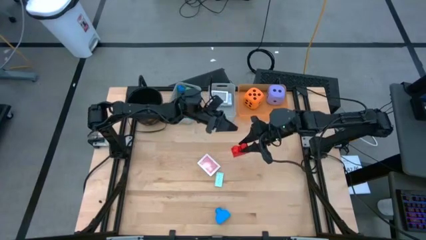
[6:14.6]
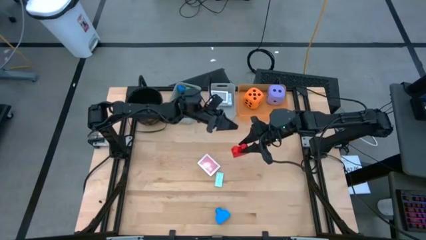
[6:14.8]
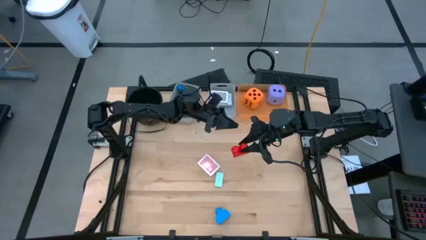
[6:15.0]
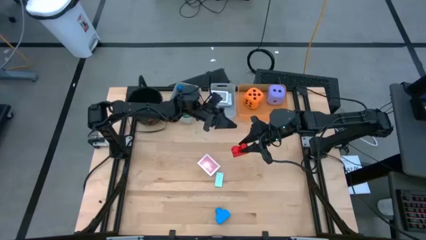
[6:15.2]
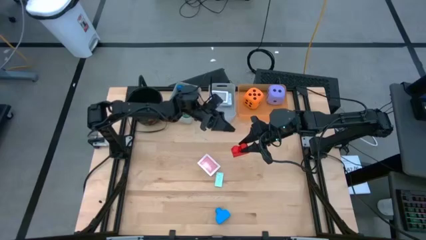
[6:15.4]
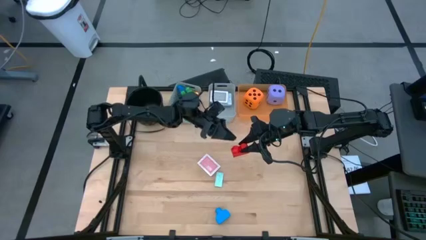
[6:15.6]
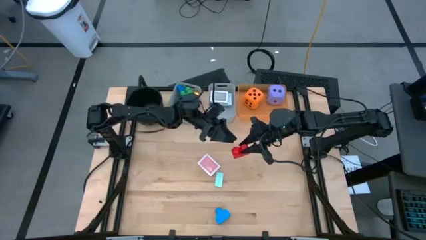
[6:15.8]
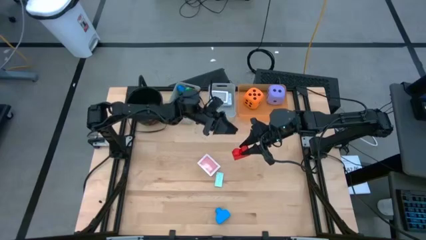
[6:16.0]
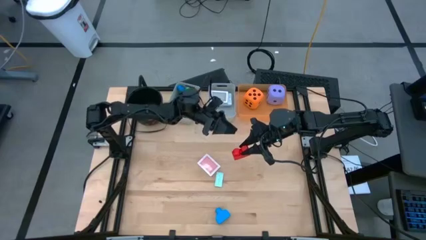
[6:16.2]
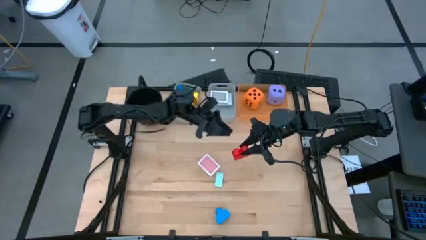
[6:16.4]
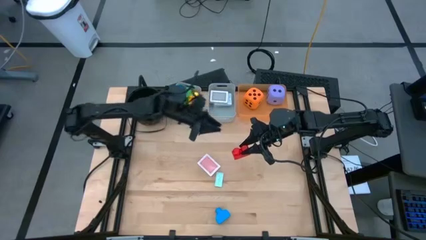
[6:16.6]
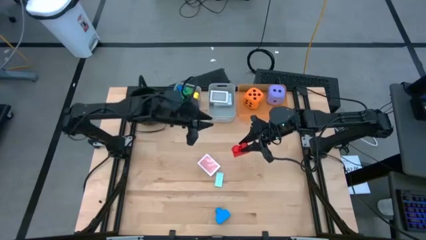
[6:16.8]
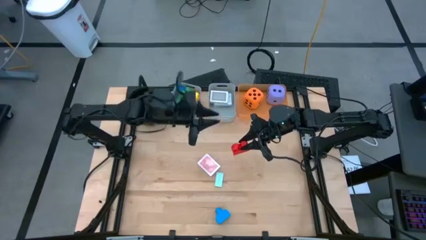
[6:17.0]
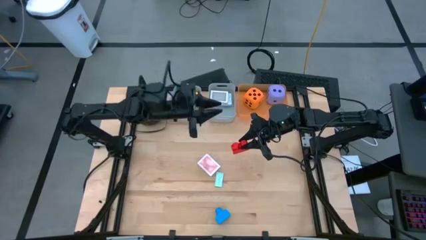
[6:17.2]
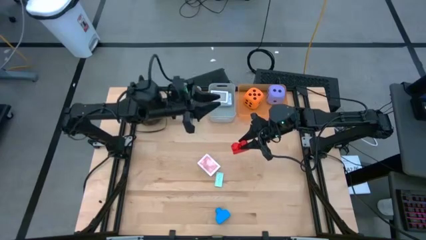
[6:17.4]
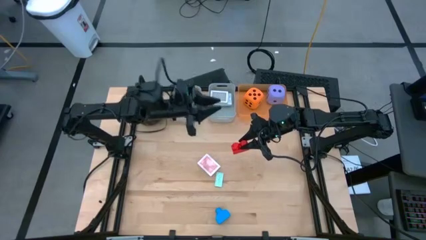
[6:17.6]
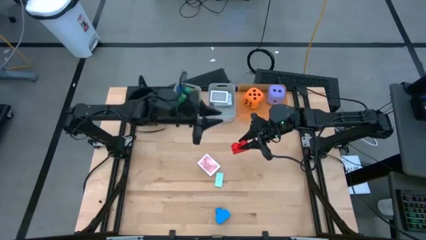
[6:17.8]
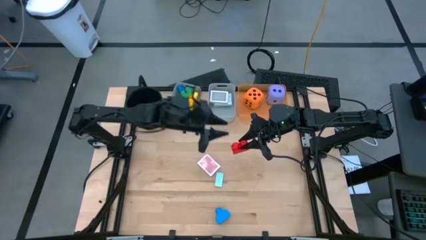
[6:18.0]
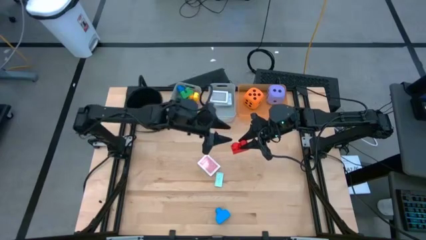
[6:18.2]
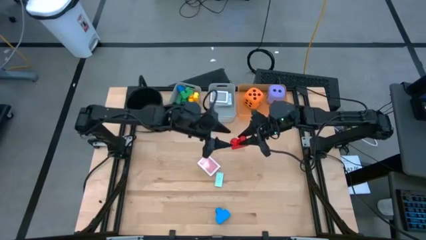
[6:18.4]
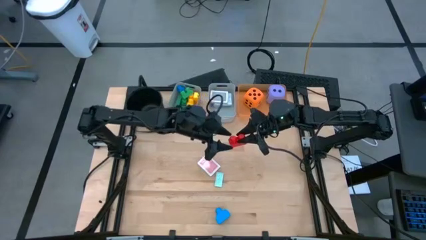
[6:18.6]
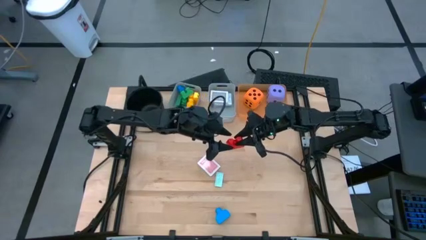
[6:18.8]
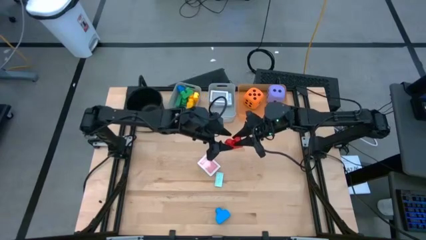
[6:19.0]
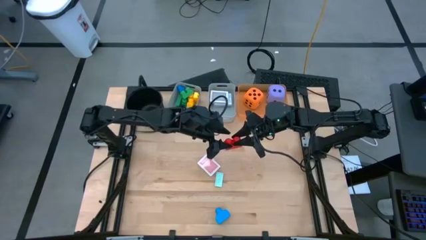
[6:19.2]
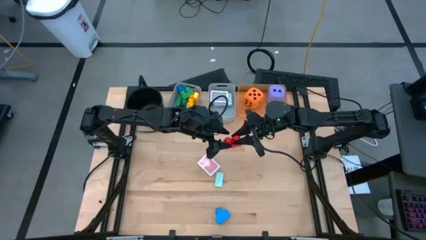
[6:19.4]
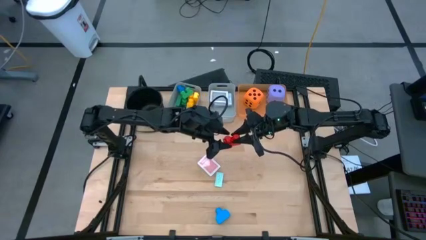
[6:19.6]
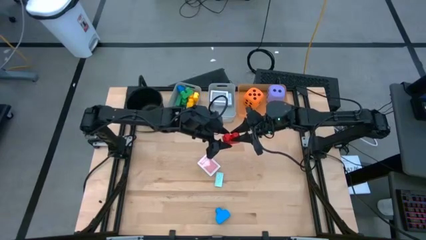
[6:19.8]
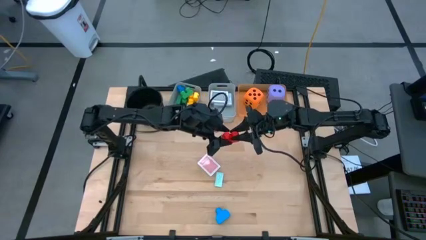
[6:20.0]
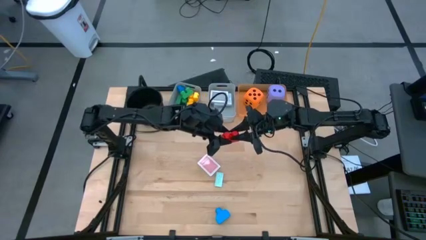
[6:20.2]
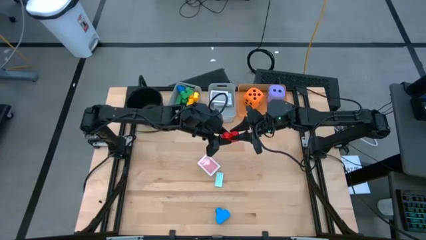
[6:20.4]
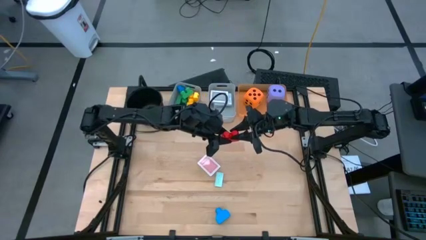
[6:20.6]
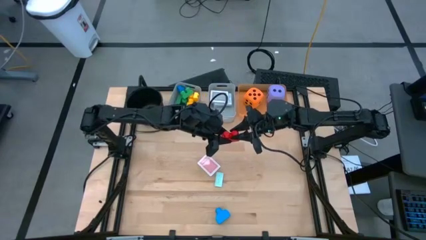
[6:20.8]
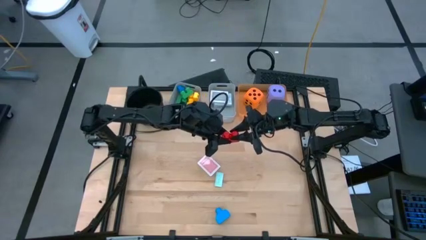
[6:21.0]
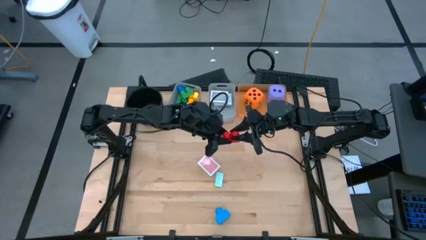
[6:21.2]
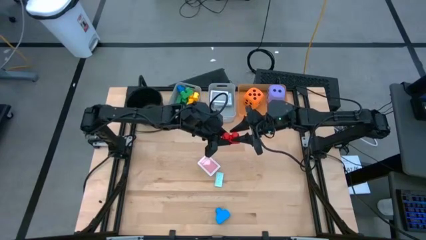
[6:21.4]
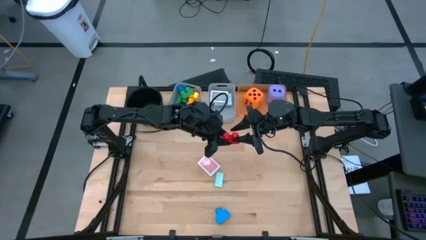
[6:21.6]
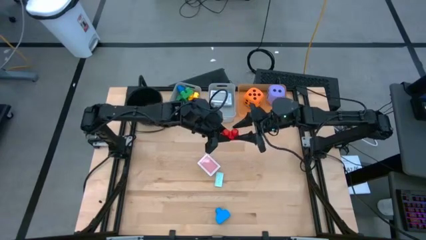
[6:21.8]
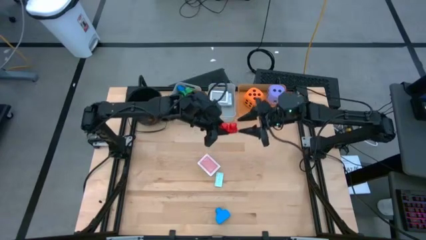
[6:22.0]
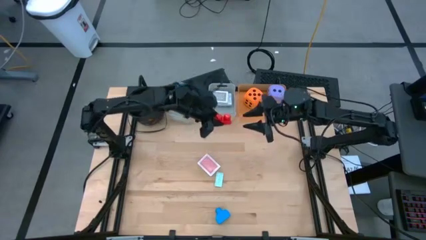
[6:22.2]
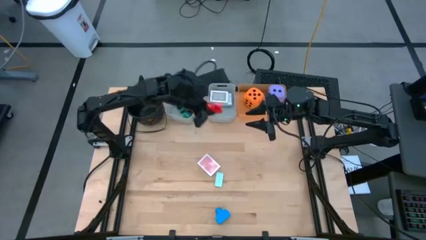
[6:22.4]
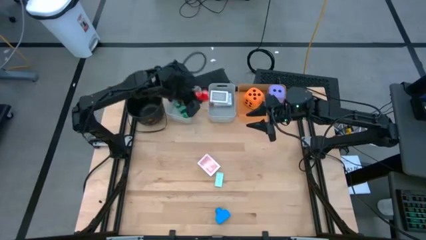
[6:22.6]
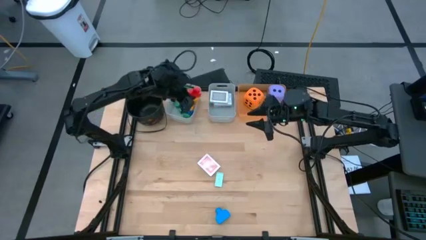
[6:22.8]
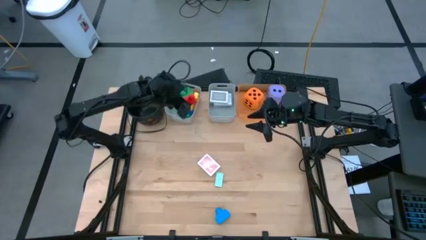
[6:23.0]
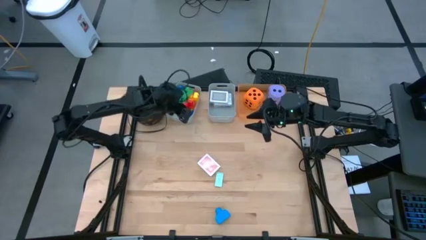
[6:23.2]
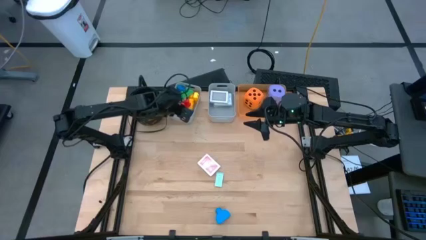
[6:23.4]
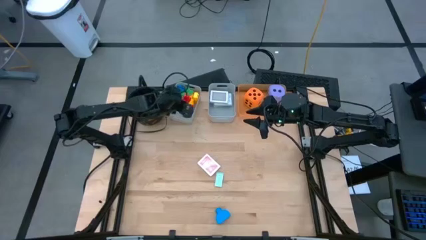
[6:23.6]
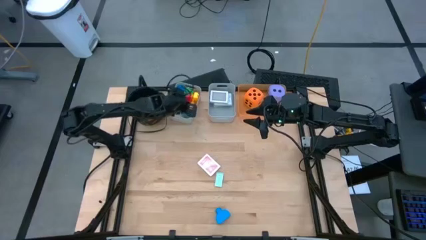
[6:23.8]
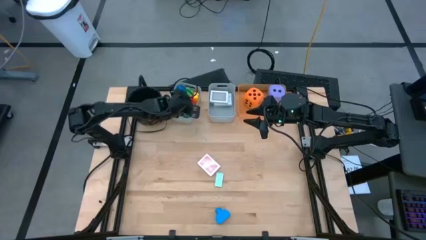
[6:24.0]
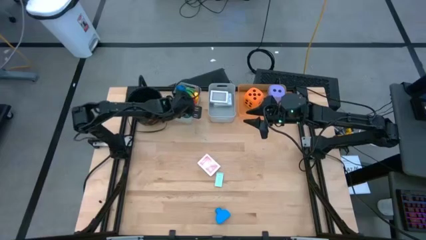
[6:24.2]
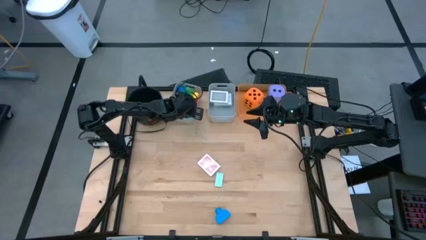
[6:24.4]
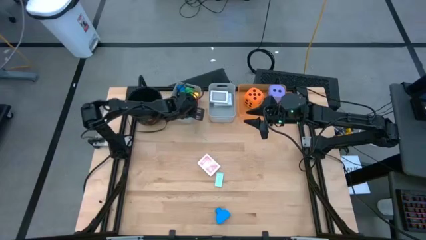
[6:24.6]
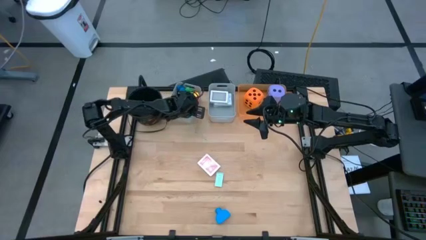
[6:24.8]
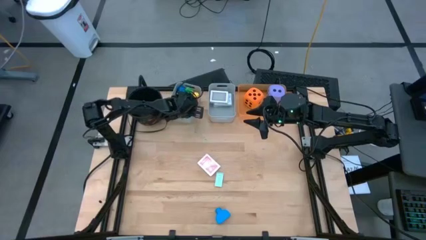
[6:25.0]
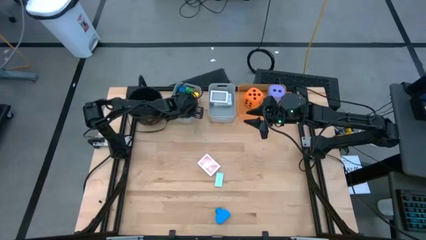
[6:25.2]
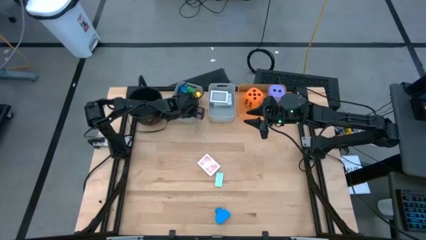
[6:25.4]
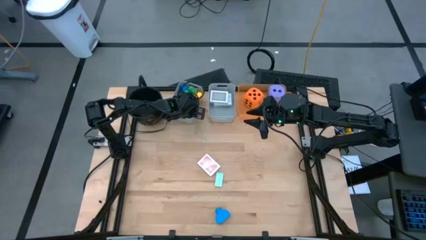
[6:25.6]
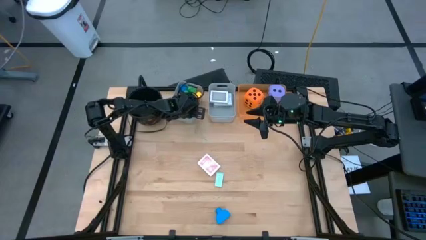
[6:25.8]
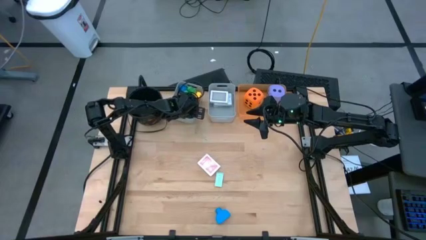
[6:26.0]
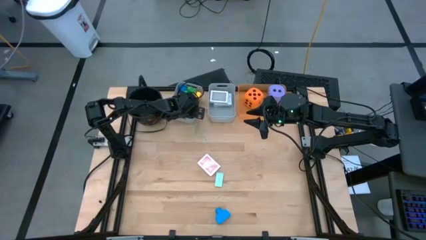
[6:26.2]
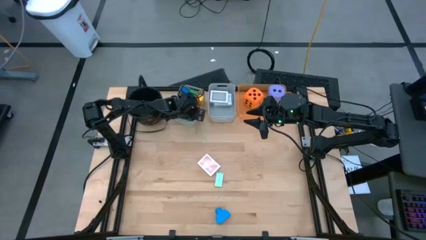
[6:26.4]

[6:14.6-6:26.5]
Task: Pick & Place Toys
Put the red game piece into the left gray bin
